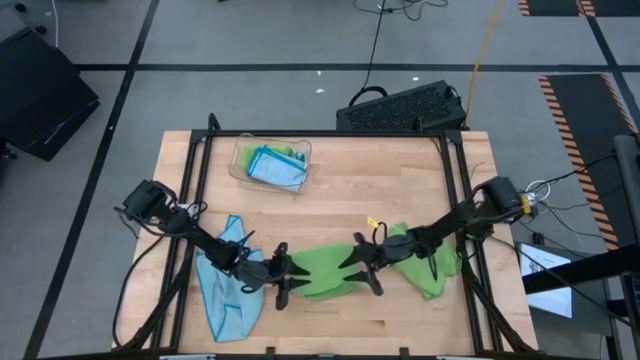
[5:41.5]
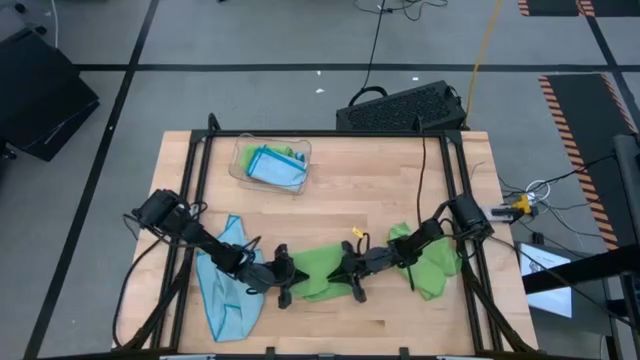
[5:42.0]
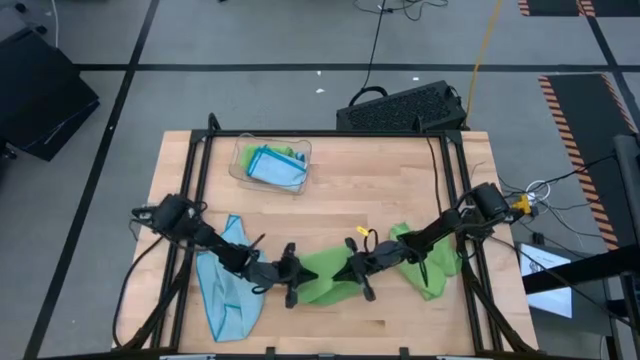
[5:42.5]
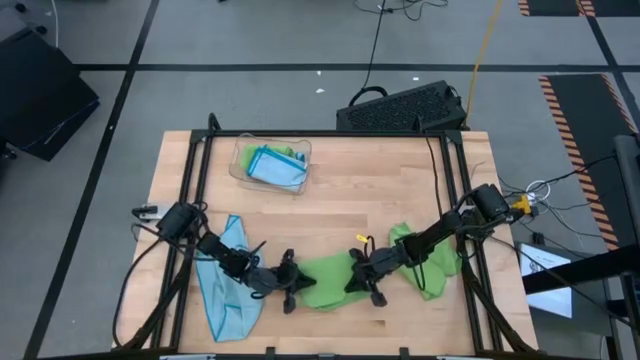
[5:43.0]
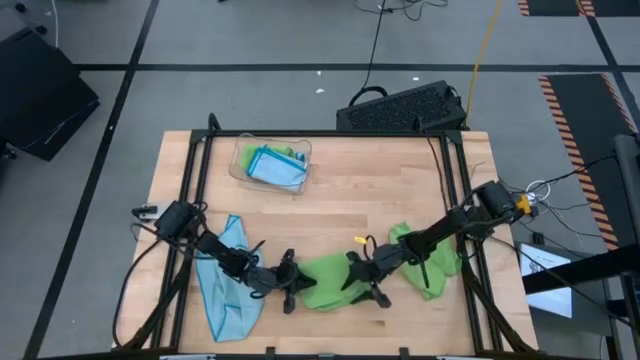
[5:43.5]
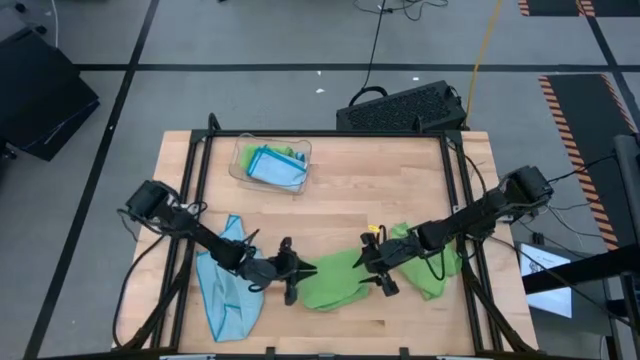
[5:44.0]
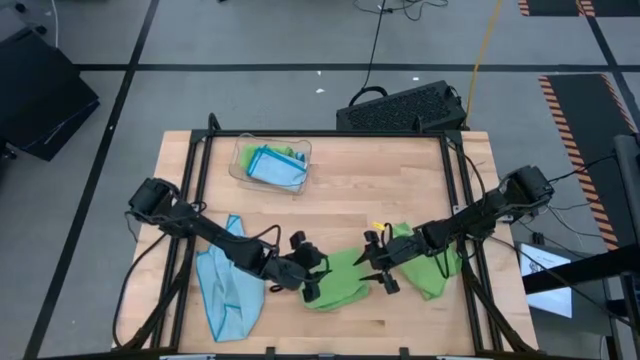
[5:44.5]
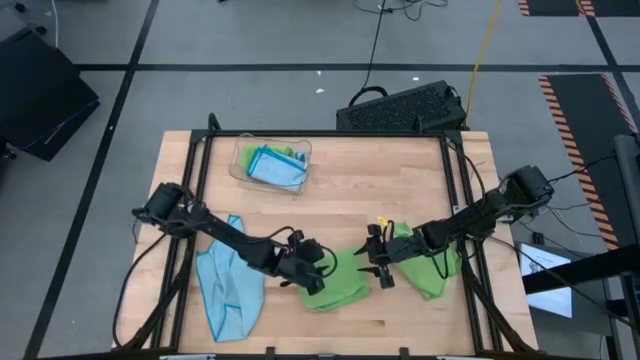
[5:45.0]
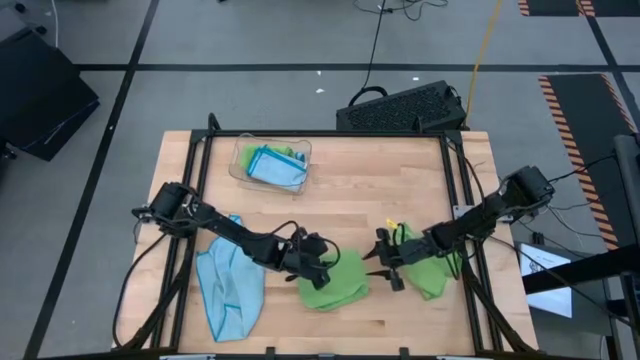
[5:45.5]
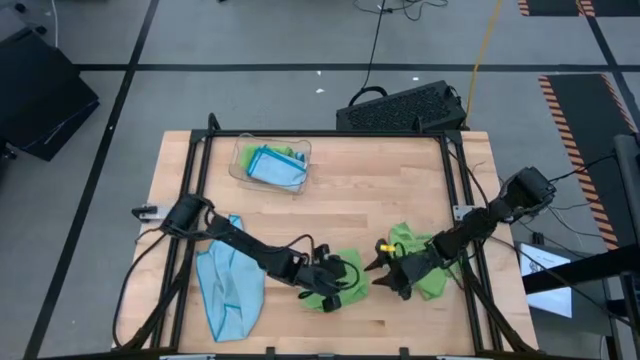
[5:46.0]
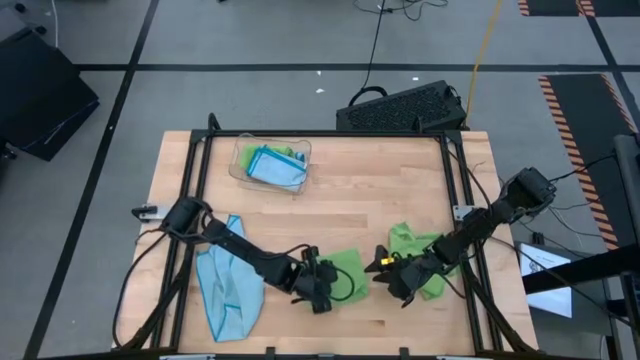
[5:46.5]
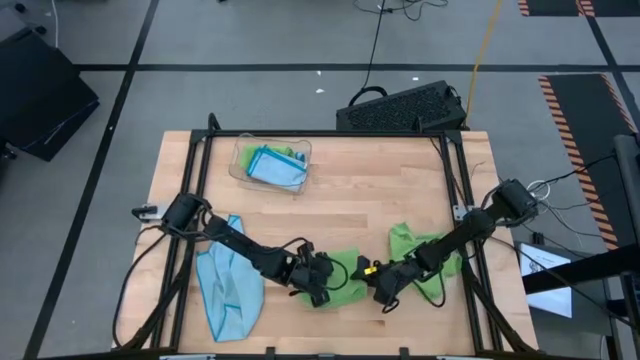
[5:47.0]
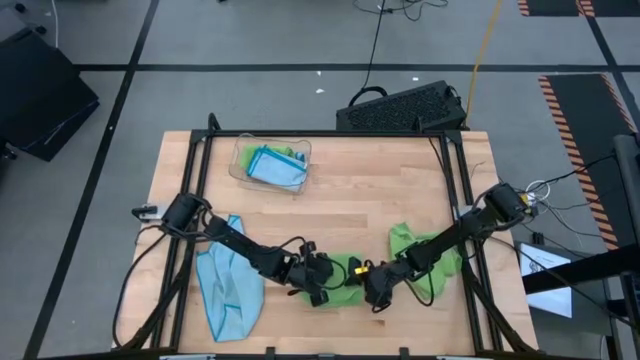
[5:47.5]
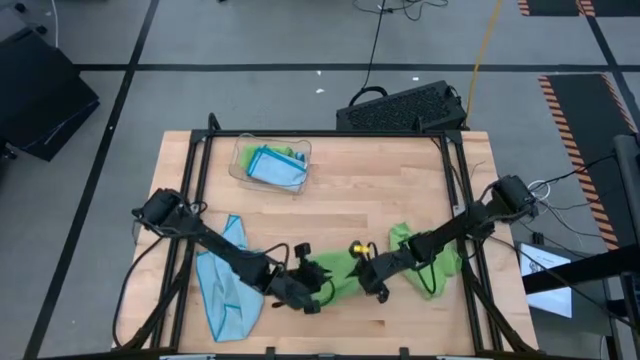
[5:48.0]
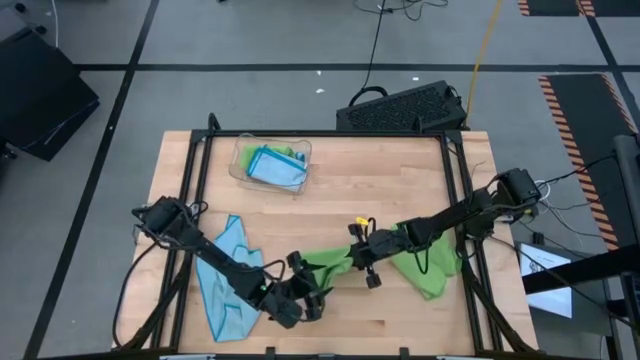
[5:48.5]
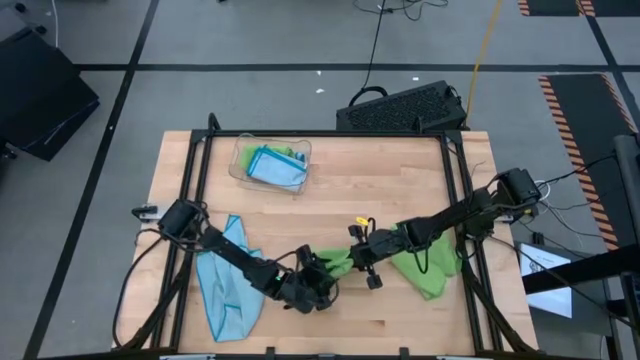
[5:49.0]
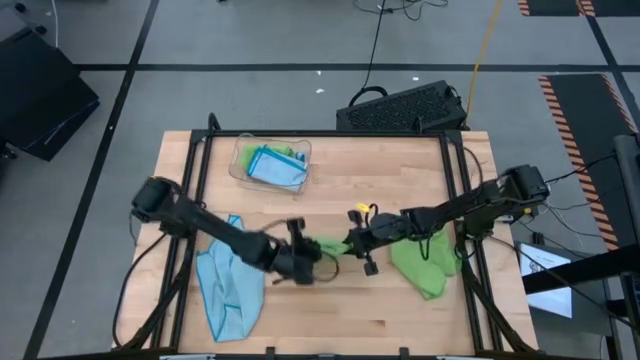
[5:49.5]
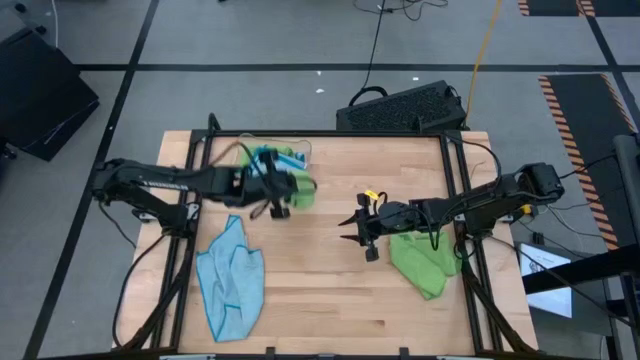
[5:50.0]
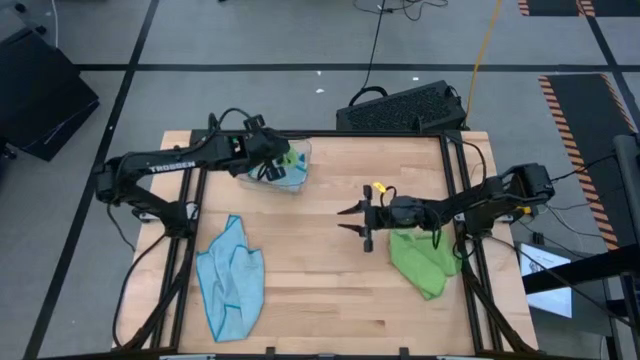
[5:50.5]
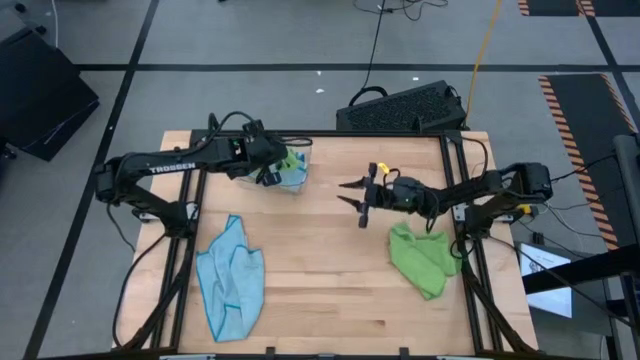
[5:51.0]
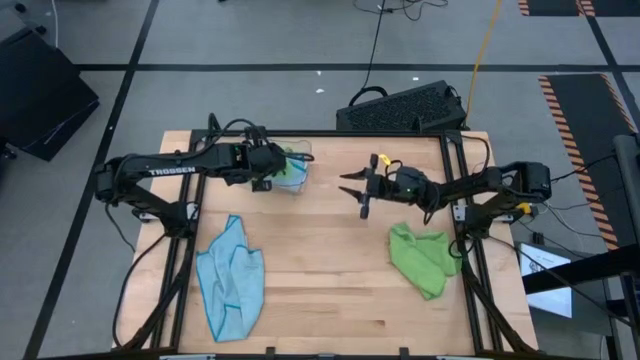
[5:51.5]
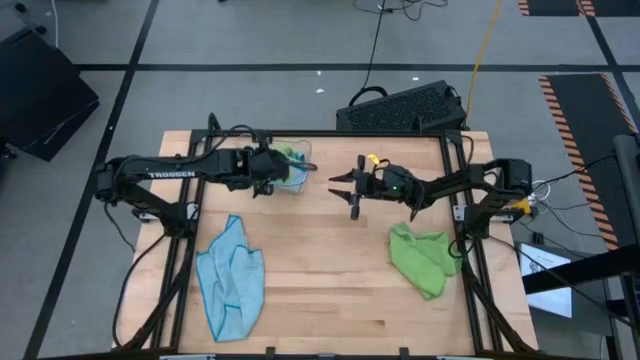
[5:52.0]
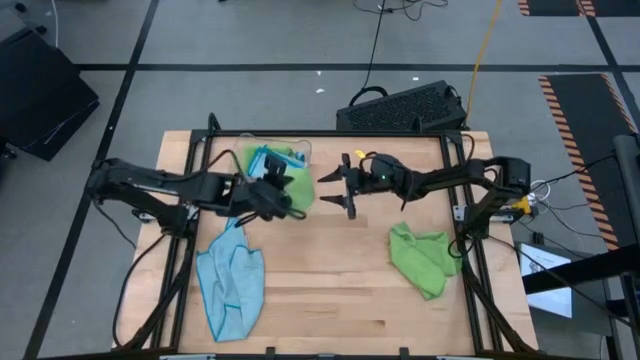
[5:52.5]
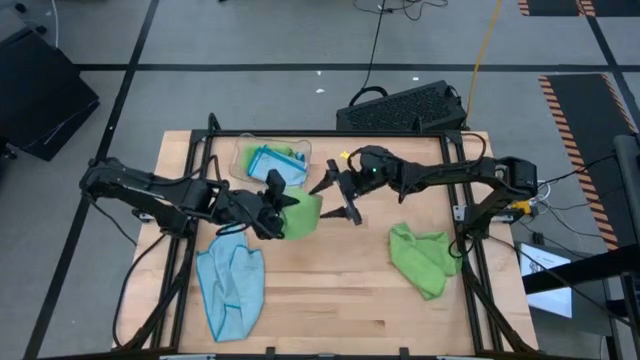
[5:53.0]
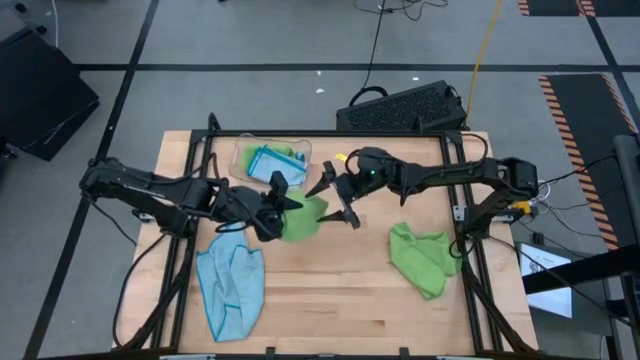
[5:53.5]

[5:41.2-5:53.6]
Task: Fold microfiber towels
Put the top green microfiber cloth into the bin

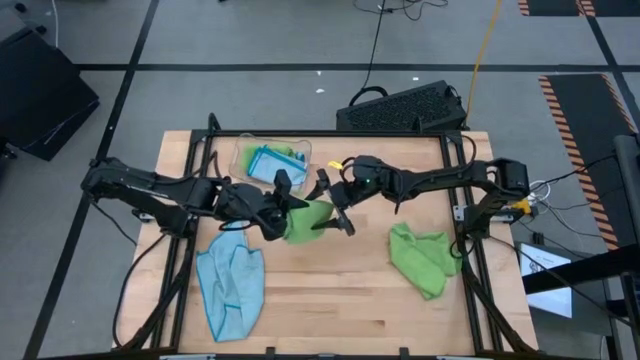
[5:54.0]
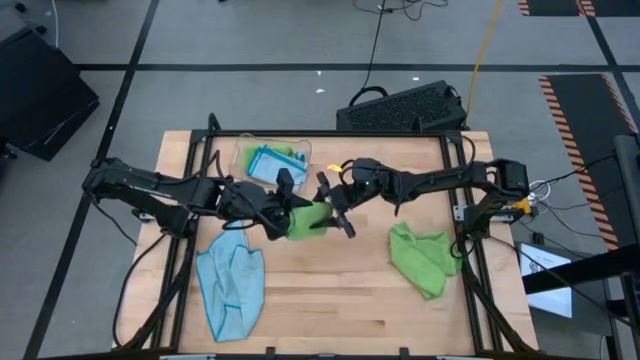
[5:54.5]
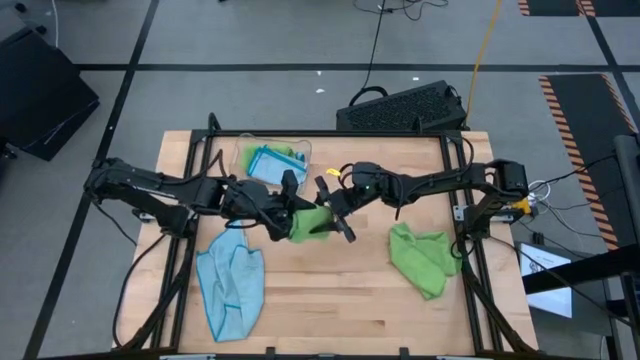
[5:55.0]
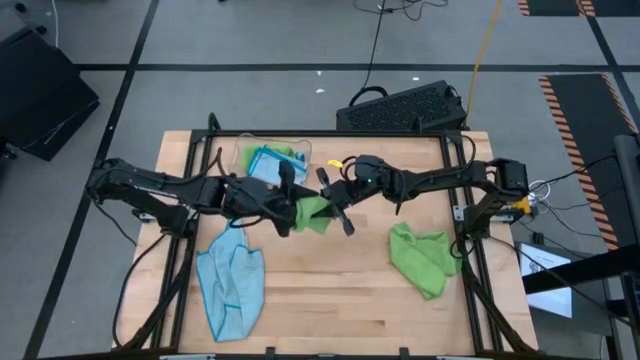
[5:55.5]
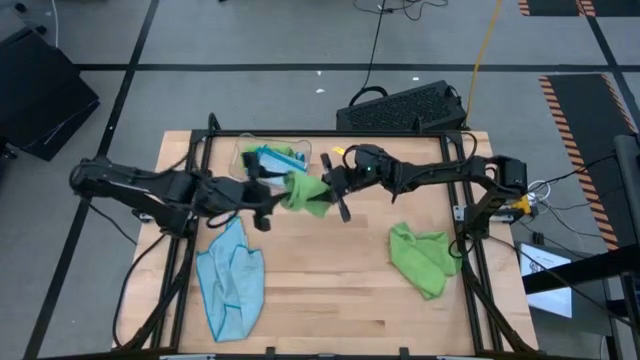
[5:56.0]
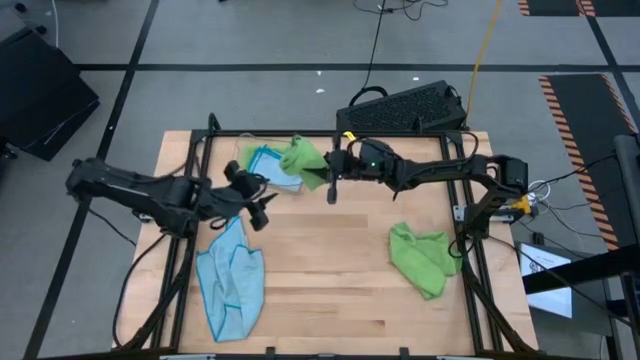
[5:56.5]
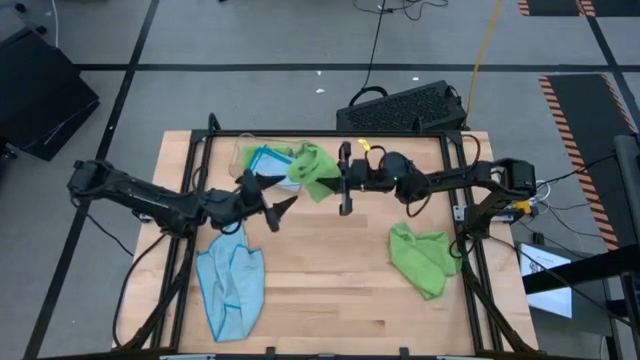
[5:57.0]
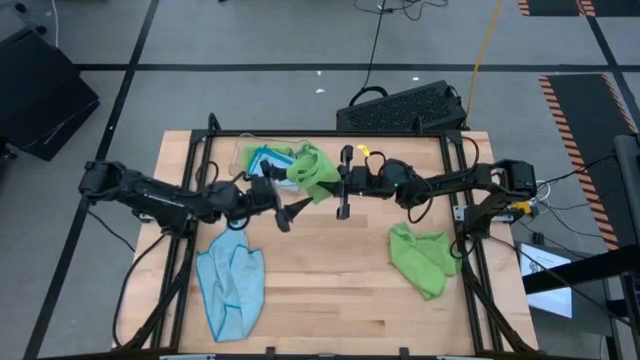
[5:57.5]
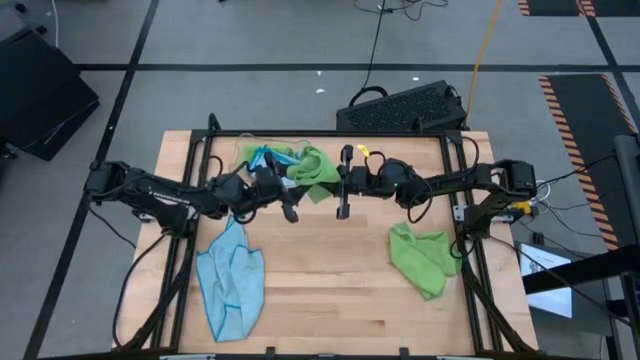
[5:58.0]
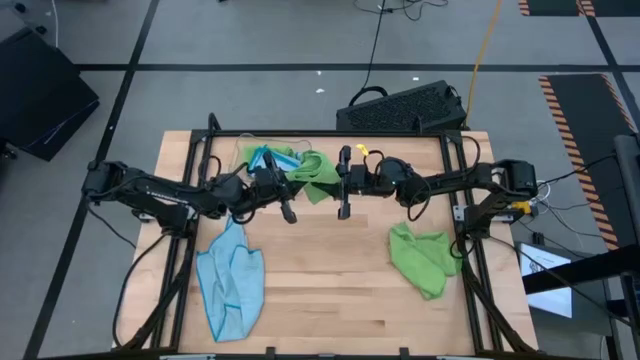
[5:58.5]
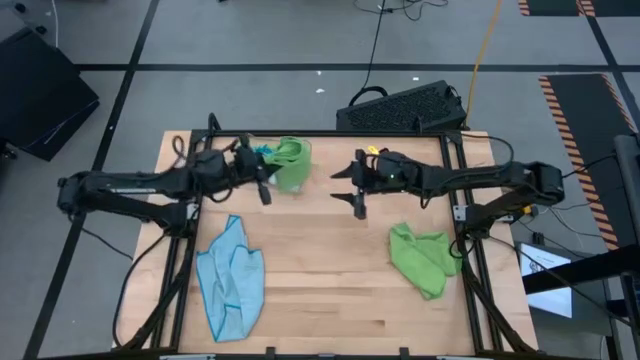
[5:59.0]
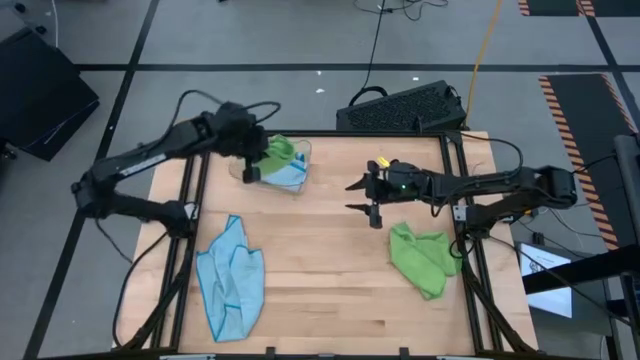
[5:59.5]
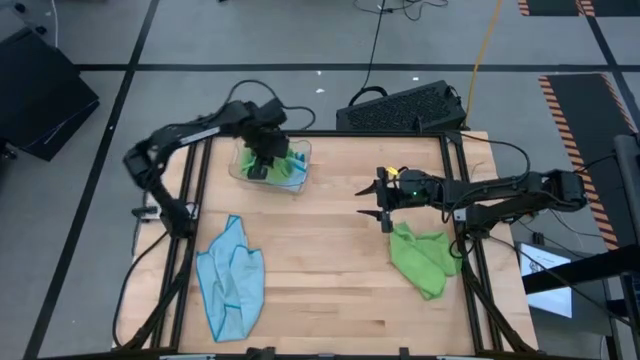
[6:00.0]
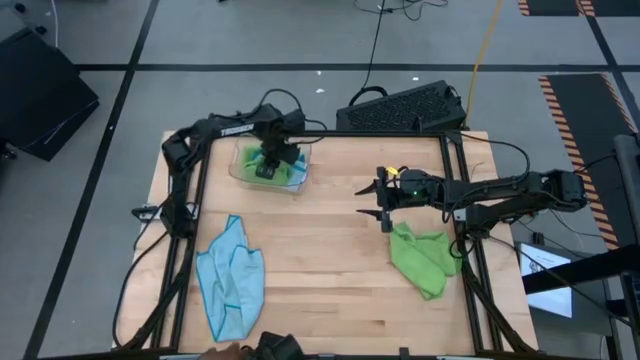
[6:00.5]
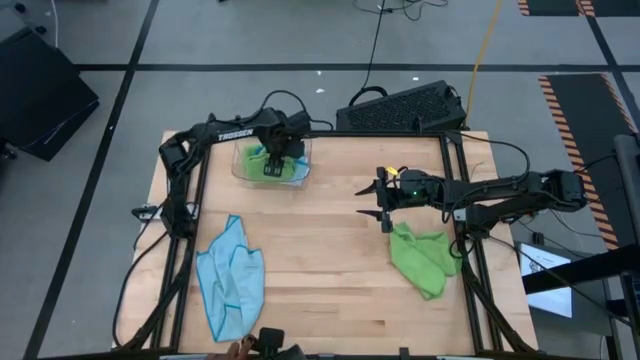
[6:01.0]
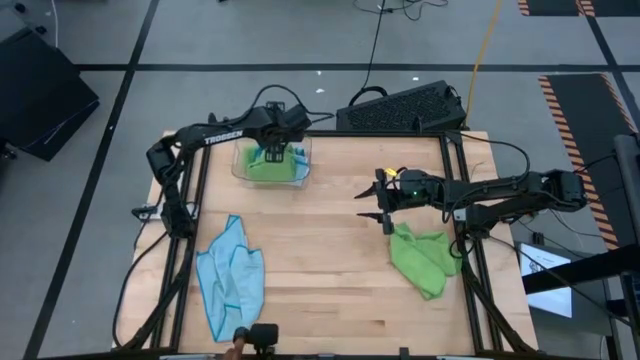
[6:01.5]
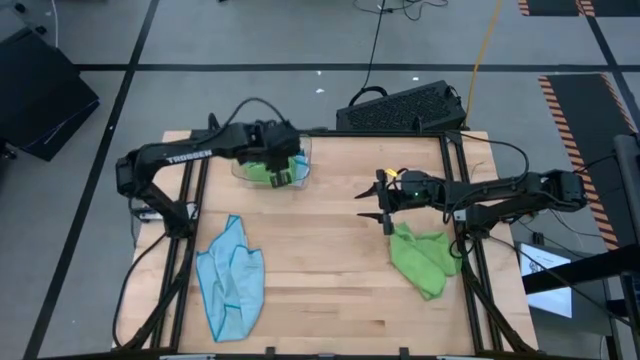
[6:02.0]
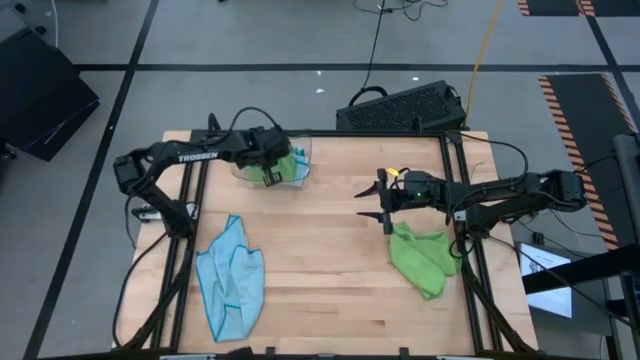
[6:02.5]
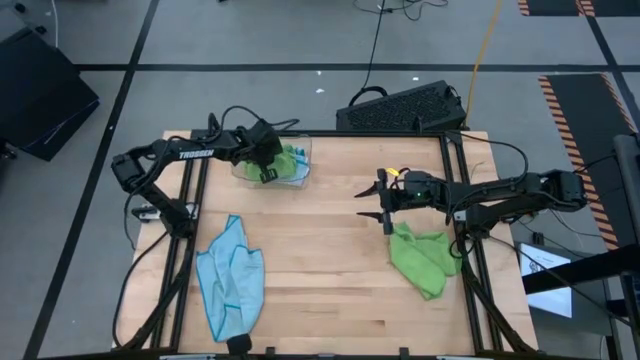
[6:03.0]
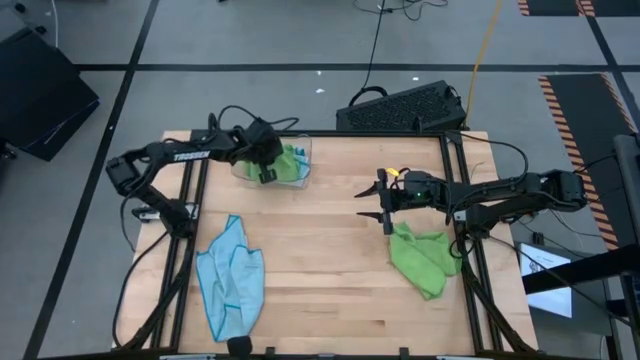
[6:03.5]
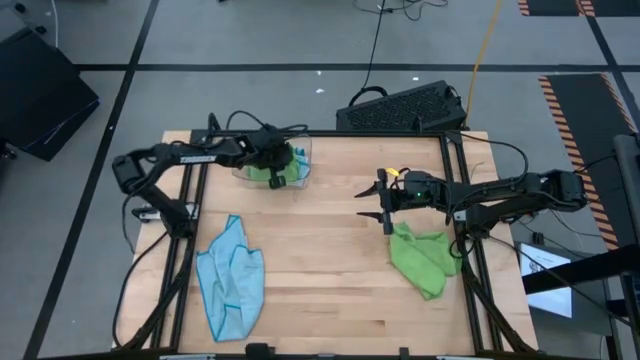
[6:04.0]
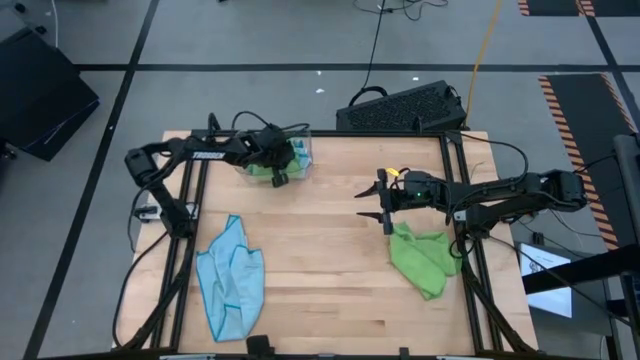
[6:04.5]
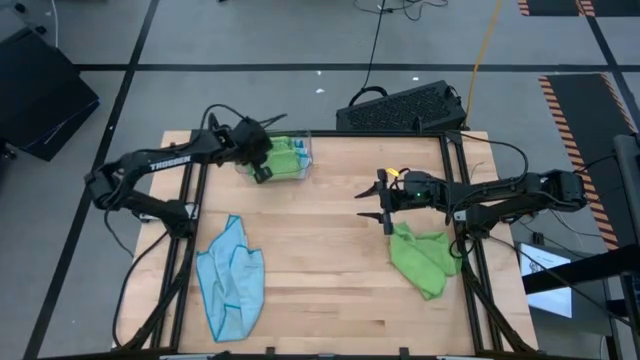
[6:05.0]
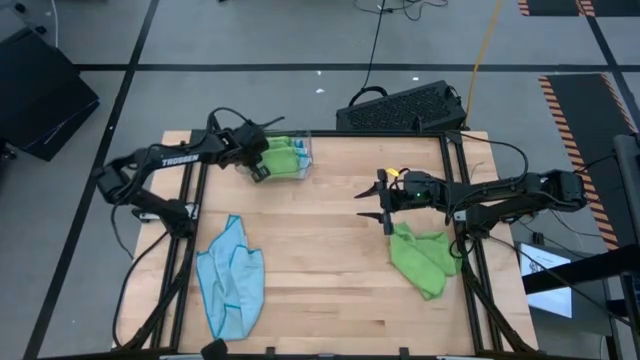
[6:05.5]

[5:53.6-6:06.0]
Put the top green microfiber cloth into the bin
